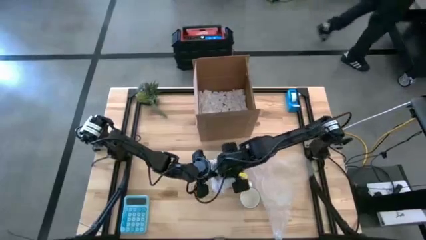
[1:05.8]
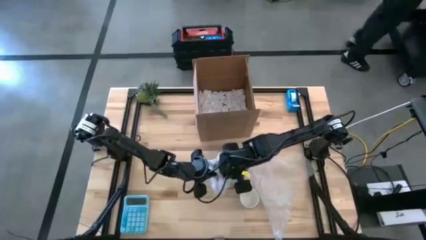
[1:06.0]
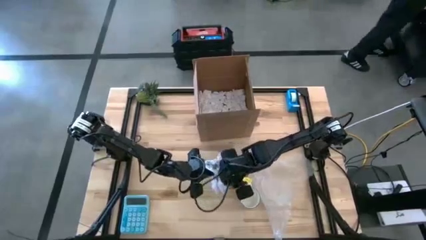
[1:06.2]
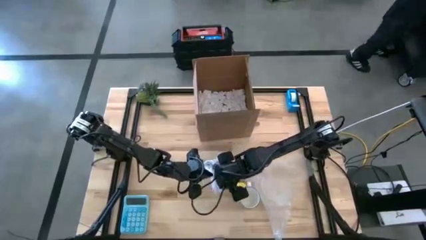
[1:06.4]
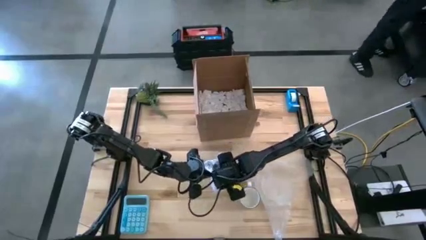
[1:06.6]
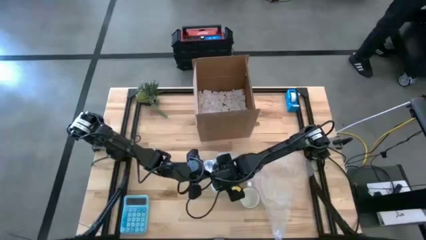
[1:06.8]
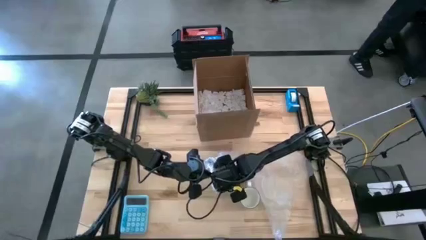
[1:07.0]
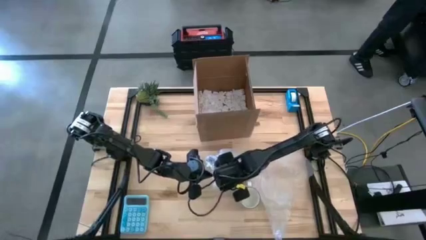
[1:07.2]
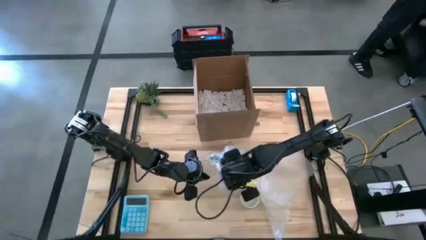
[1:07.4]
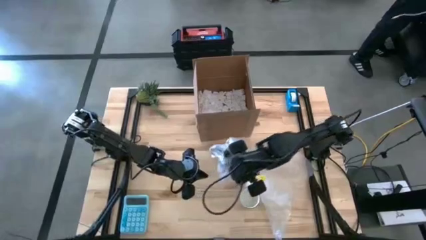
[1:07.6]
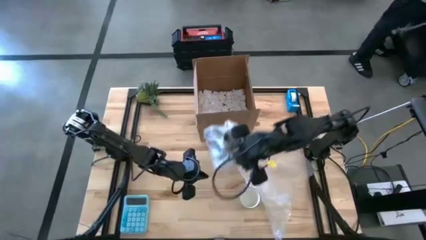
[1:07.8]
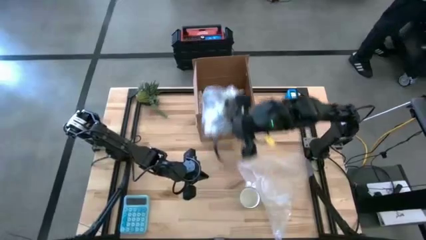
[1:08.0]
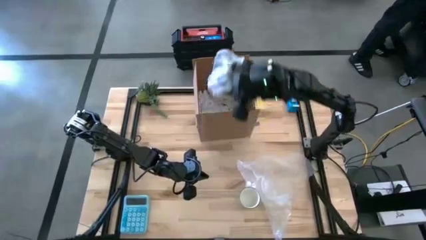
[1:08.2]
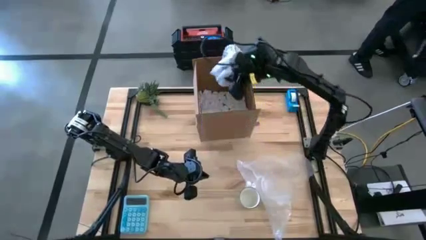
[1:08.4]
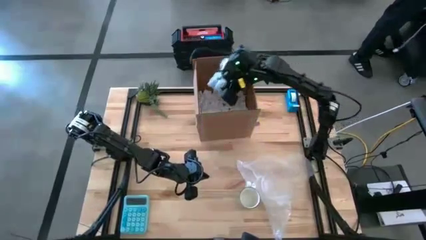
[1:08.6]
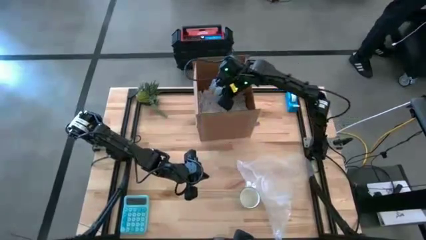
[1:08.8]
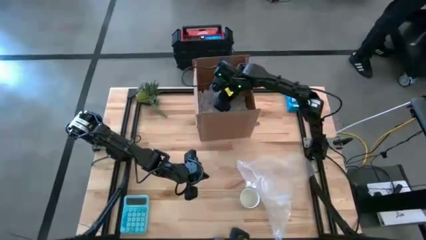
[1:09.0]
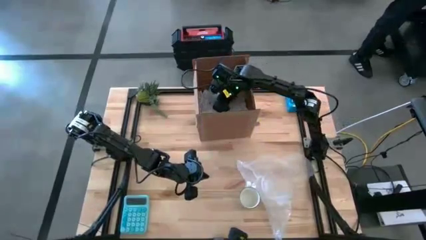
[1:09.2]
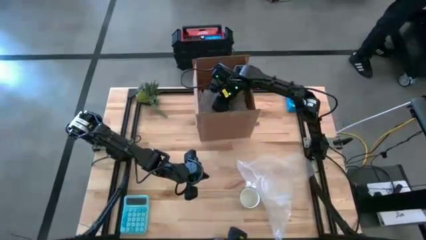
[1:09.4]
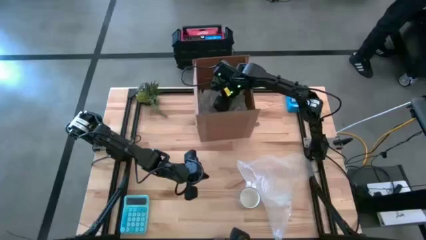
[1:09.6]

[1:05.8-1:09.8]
Task: wrap mug
Put the wrapped green mug into the cardboard box

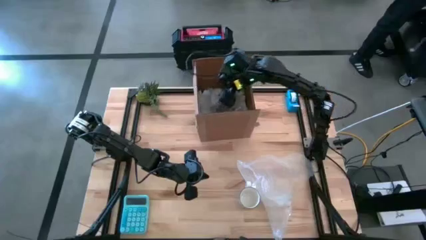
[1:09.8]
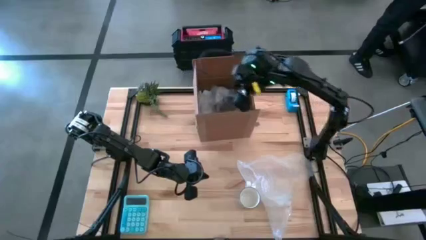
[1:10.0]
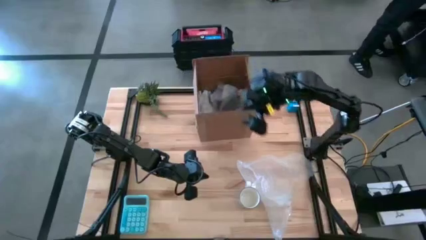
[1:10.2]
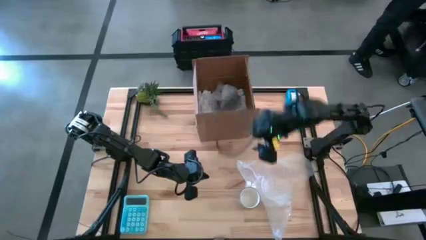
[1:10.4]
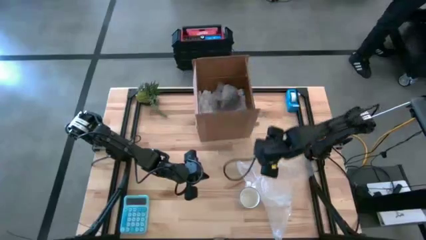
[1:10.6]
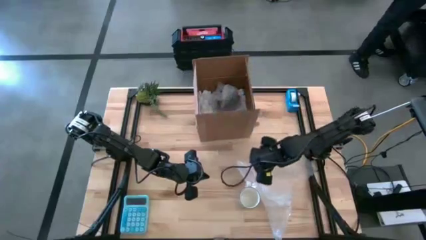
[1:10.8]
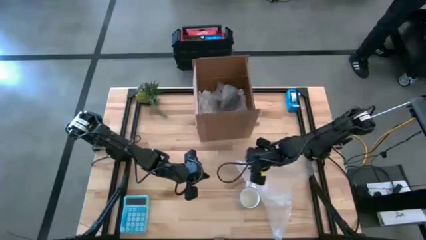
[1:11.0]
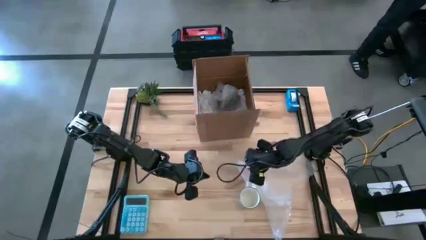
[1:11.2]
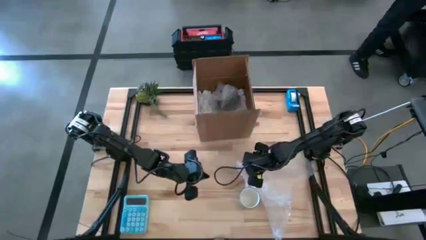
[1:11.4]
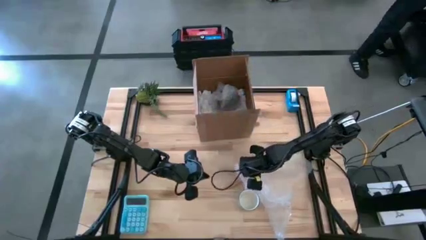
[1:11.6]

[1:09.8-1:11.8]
Prepare the bubble wrap

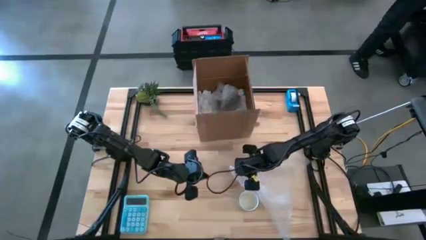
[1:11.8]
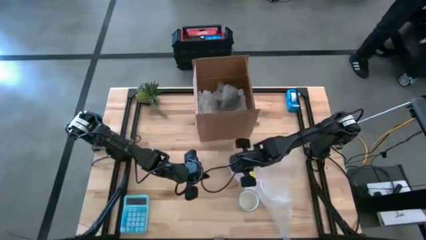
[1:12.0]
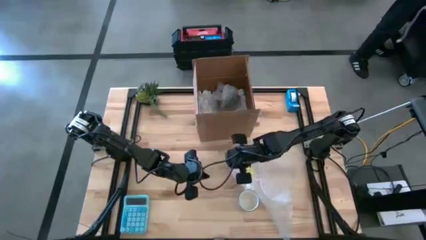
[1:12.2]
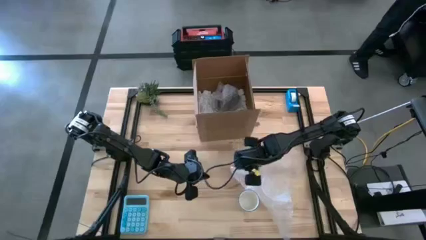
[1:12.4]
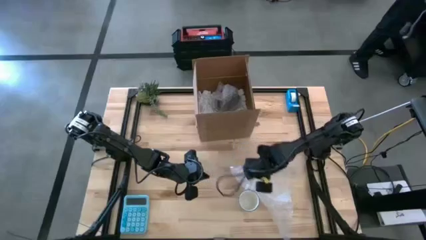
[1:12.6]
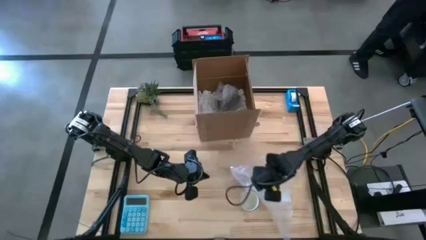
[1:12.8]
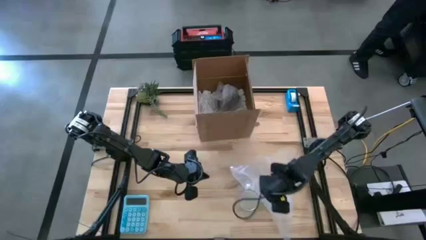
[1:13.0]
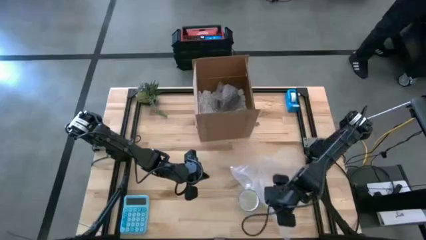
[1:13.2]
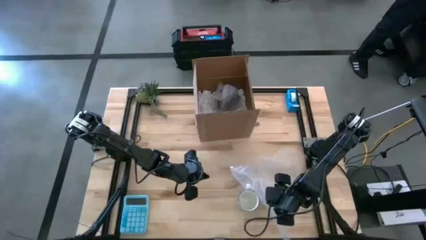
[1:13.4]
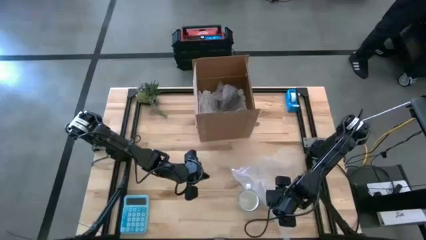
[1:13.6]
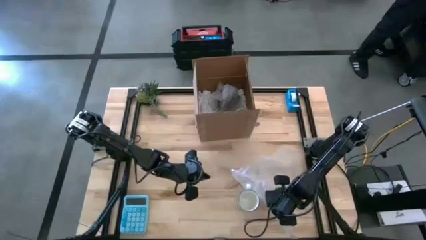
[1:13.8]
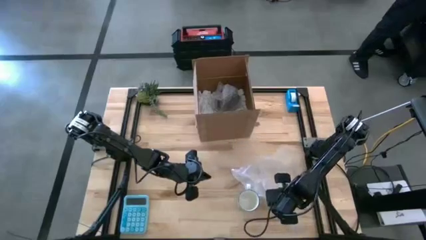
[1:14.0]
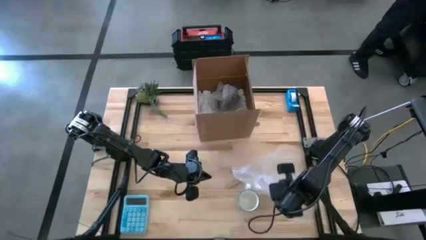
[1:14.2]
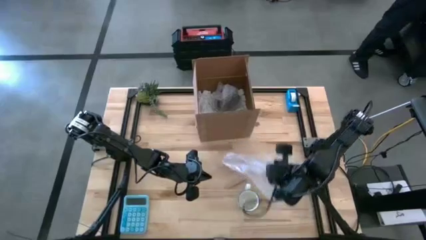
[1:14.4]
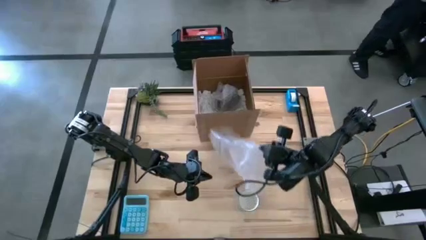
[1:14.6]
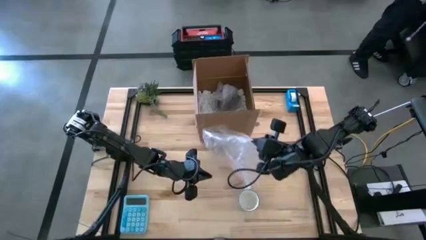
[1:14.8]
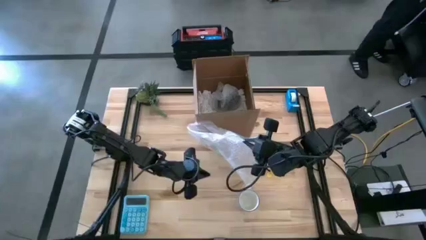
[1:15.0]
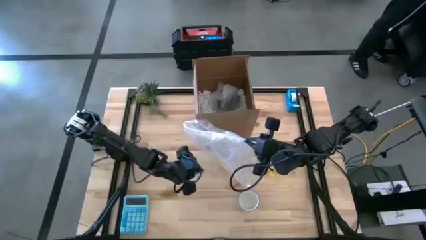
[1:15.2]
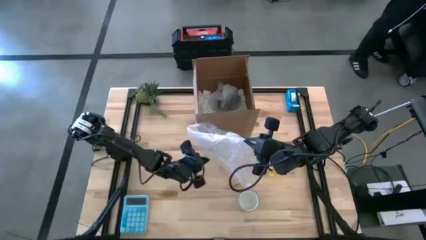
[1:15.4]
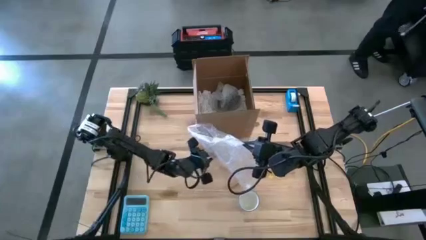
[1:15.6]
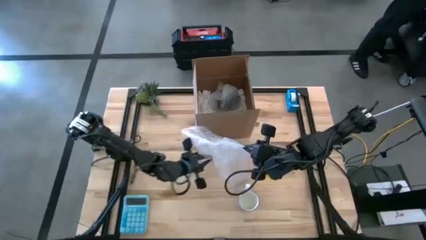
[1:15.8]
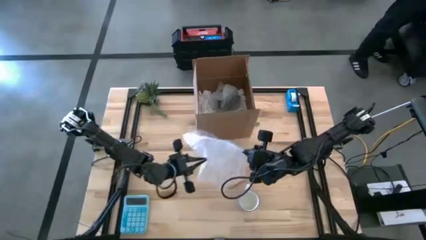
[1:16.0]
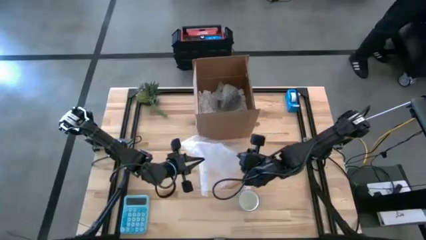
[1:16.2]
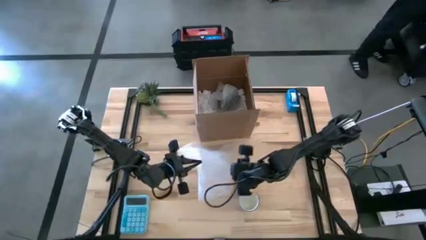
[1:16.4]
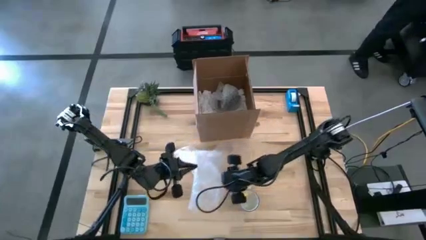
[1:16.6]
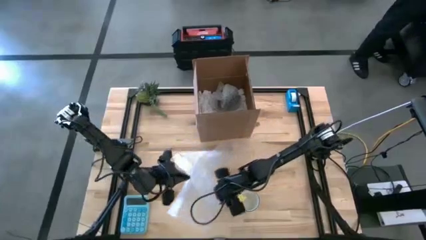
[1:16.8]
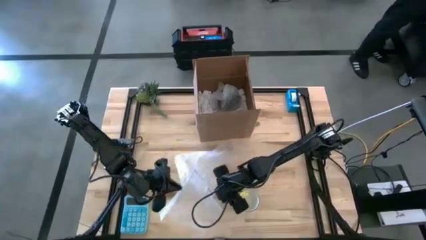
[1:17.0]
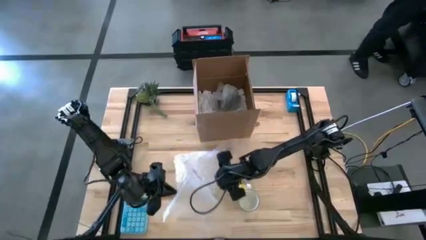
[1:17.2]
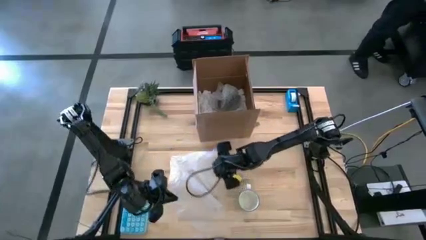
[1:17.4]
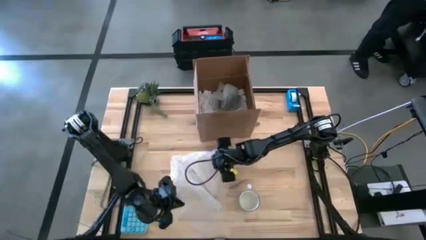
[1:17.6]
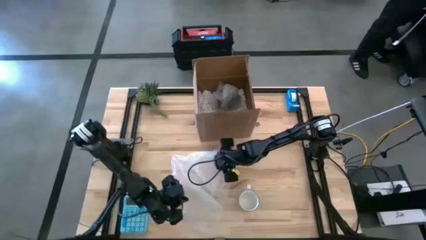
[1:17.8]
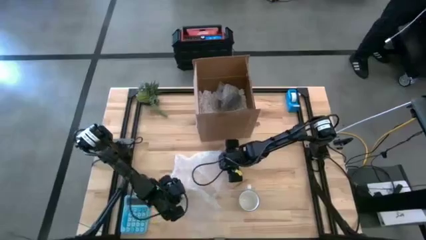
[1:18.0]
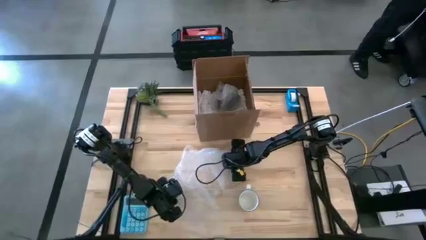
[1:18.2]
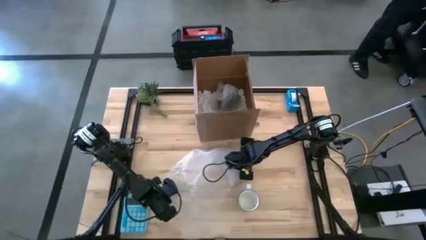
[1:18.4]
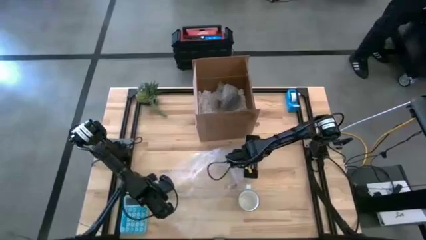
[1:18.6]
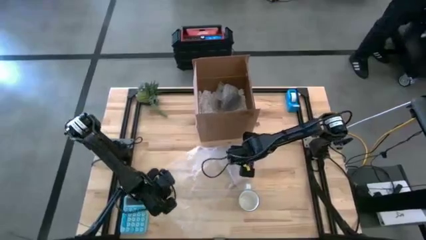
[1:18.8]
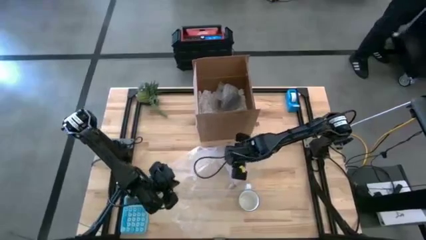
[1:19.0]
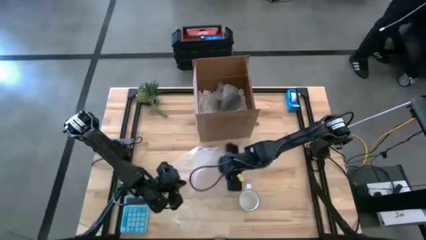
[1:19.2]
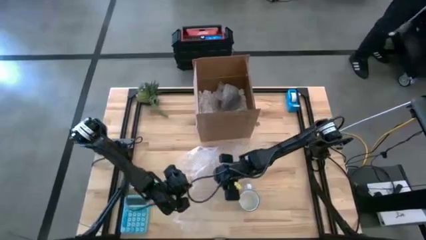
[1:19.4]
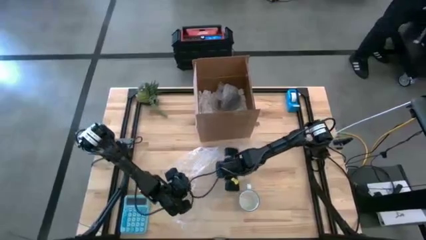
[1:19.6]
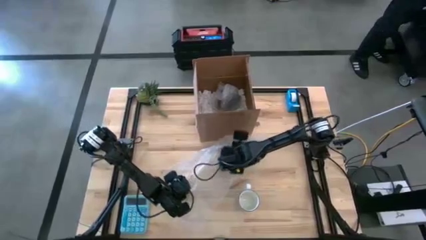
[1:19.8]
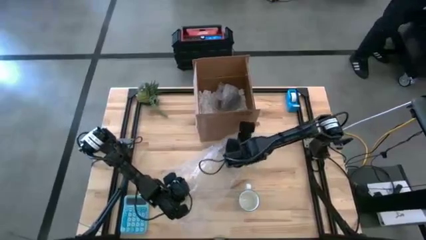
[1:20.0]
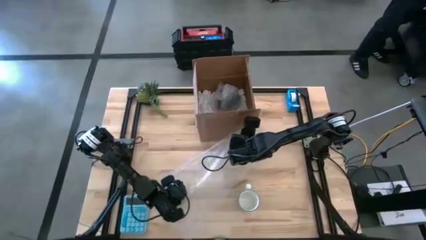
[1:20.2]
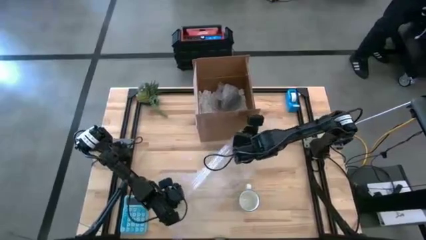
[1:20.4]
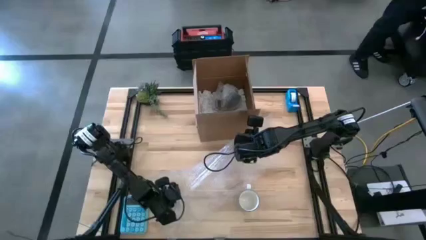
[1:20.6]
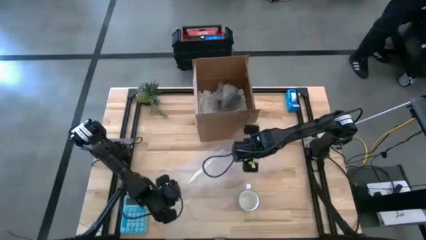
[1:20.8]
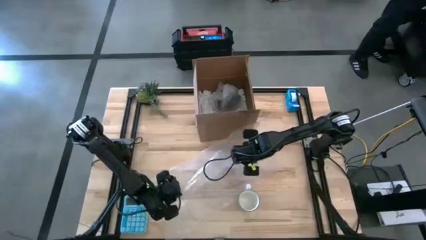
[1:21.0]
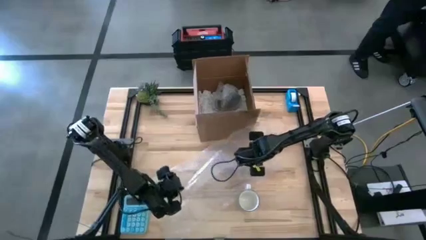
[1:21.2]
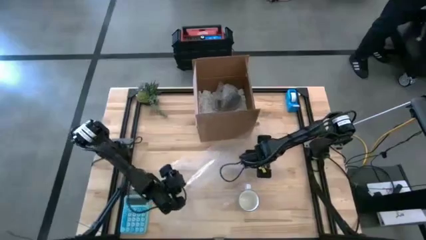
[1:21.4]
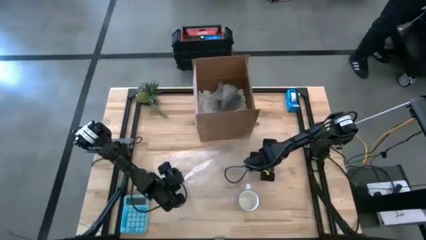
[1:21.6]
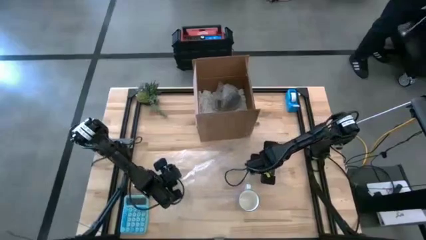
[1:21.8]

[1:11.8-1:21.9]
Prepare the bubble wrap
